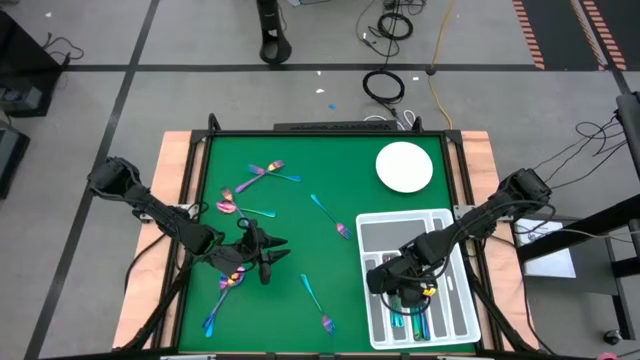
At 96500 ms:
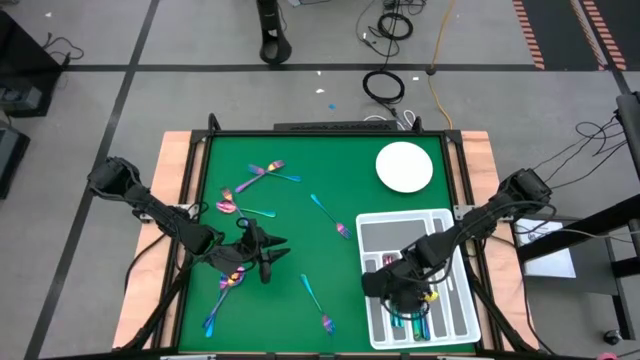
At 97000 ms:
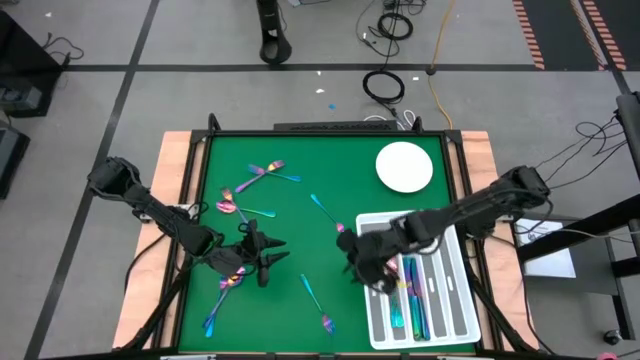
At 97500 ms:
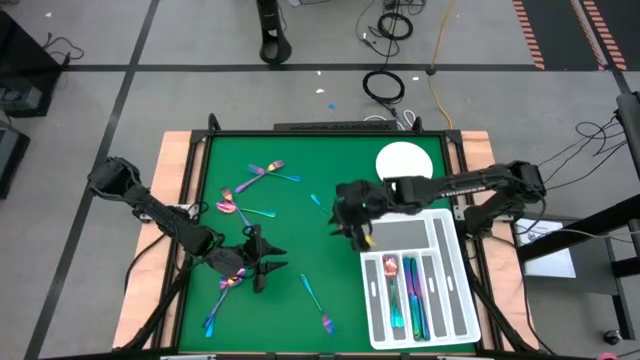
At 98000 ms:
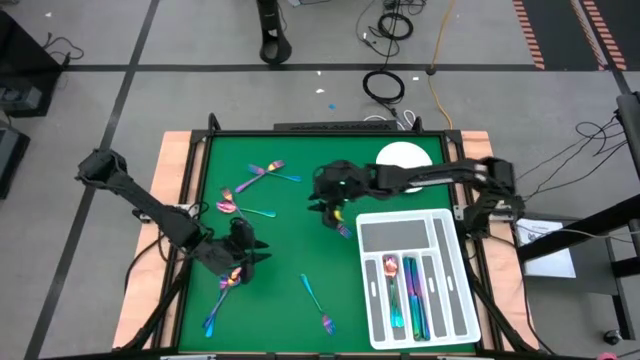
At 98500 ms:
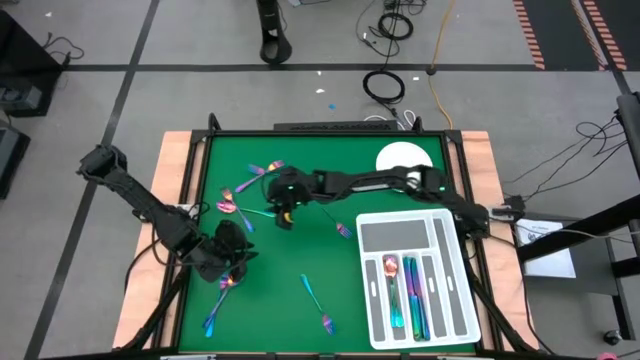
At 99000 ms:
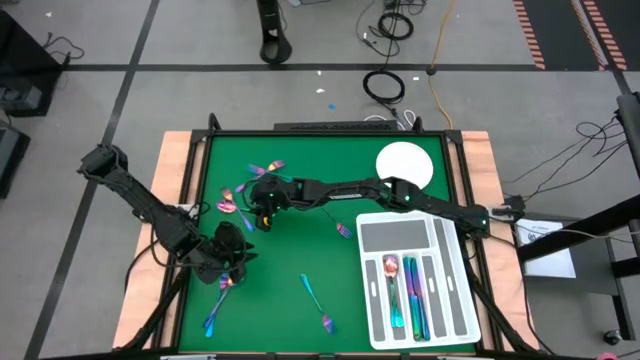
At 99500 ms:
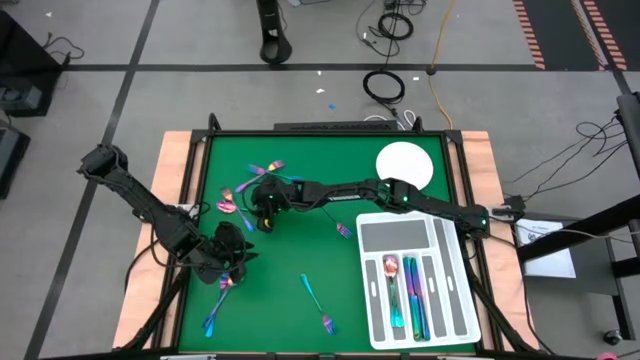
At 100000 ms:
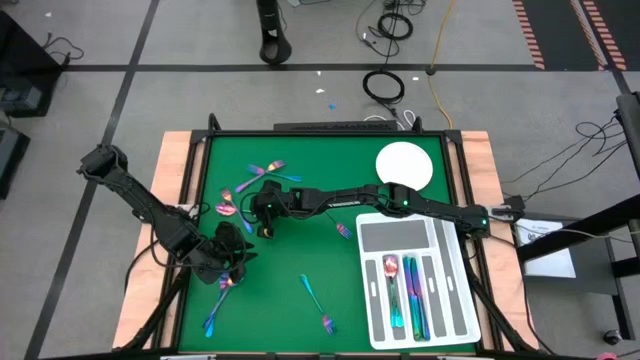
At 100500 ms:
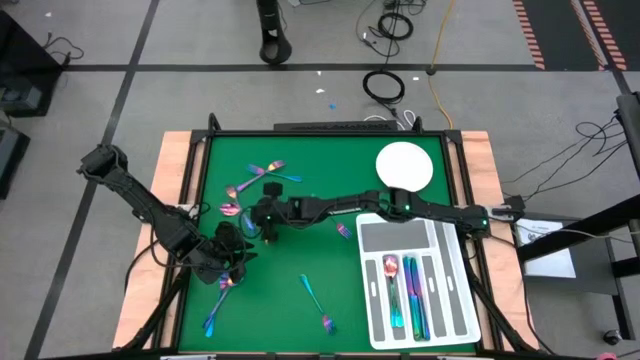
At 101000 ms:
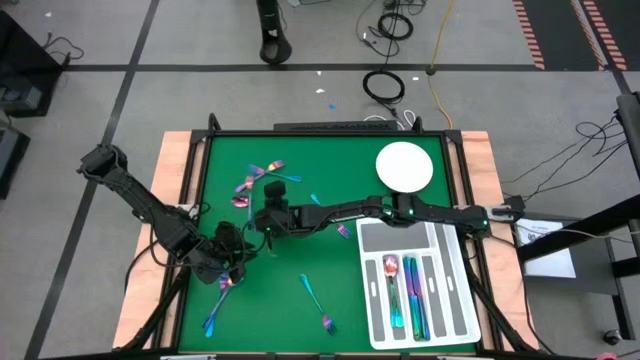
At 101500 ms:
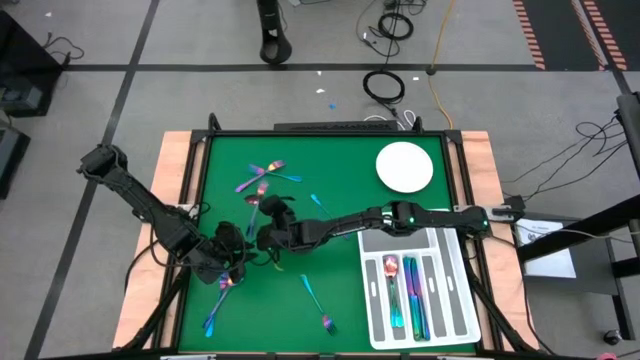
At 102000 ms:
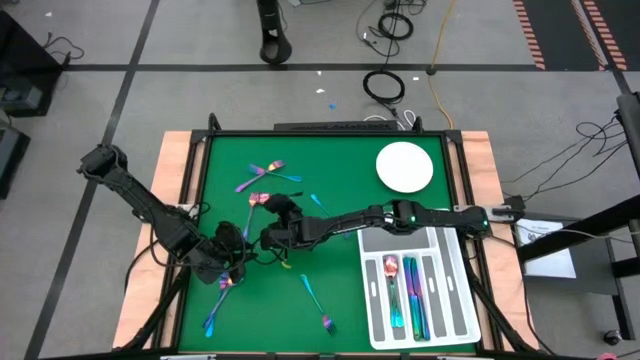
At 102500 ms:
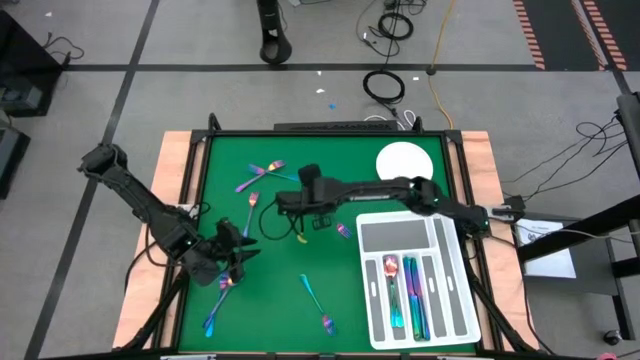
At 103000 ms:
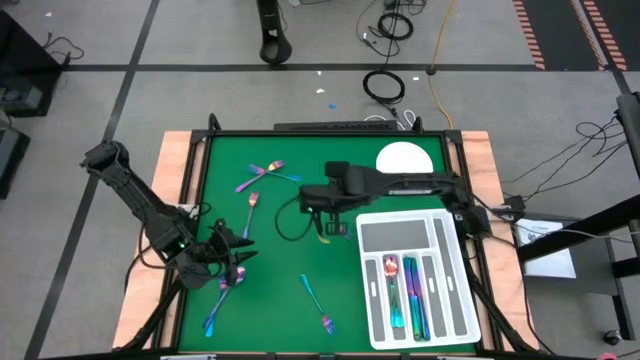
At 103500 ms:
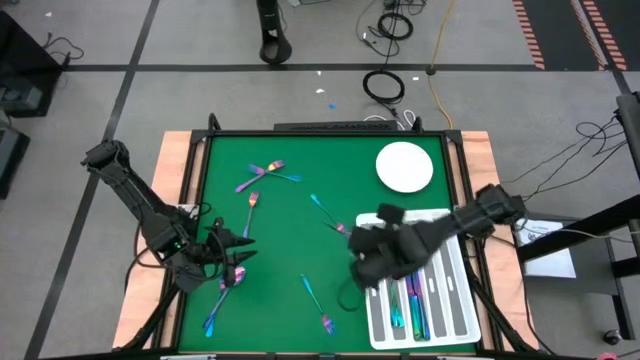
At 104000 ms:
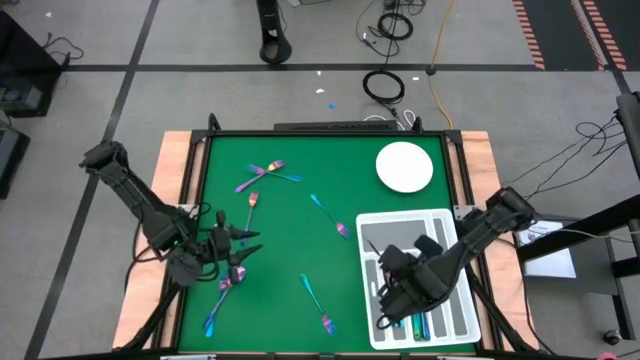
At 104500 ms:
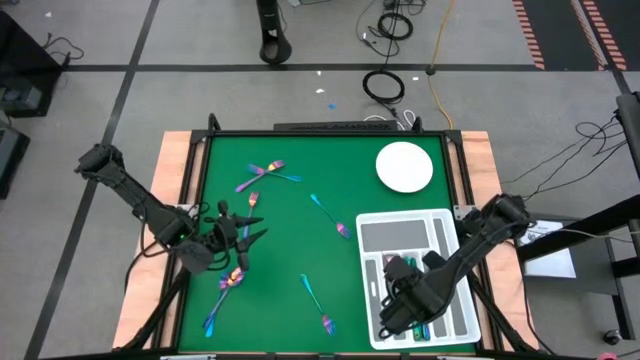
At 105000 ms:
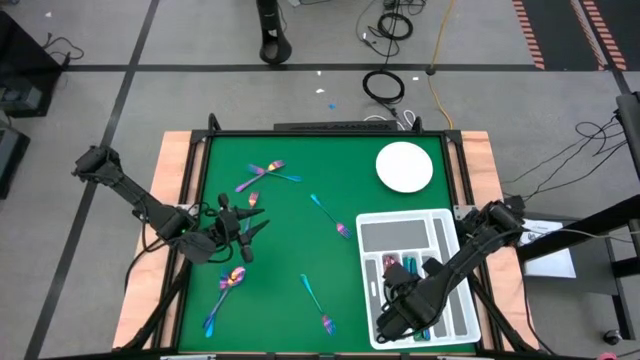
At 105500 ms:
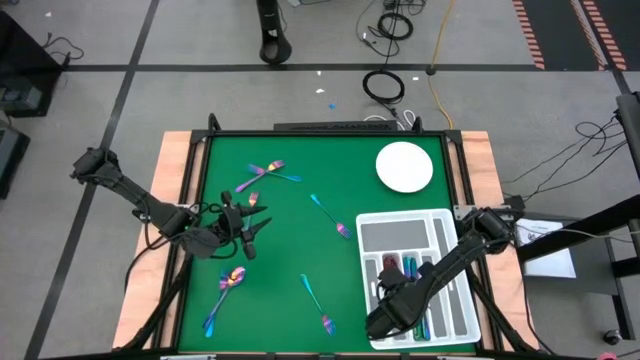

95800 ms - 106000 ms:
Task: Sort silverware
Put the top spoon into the utensil organizer

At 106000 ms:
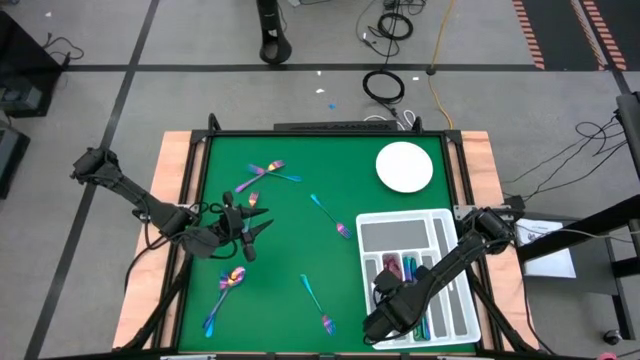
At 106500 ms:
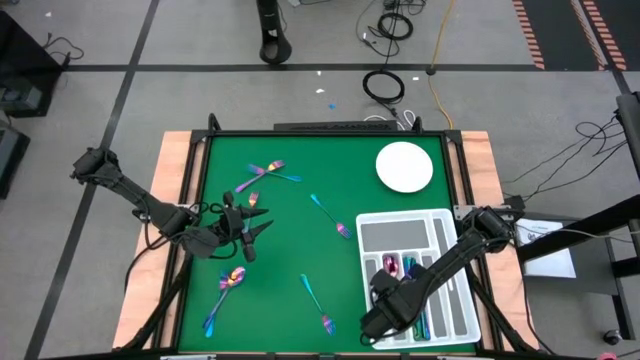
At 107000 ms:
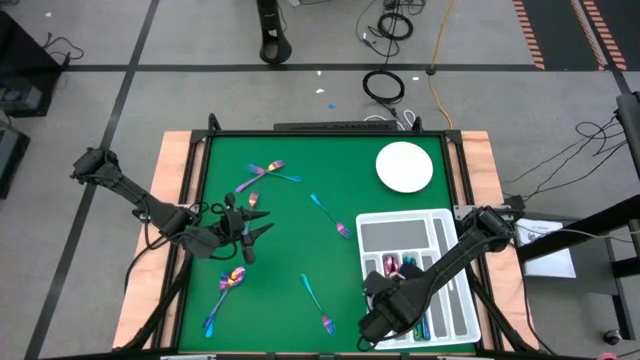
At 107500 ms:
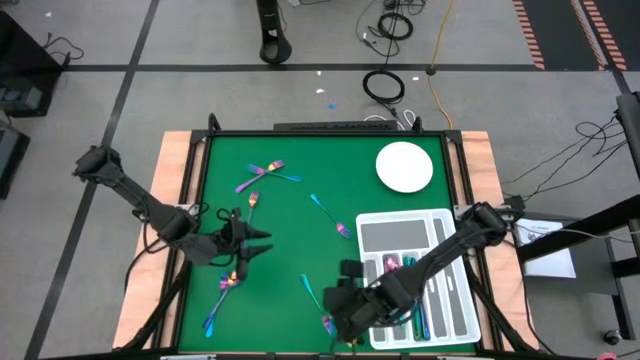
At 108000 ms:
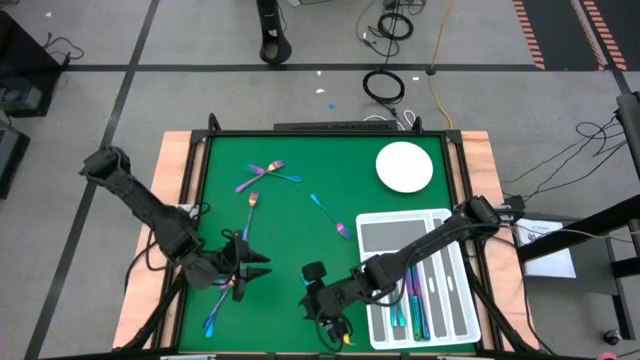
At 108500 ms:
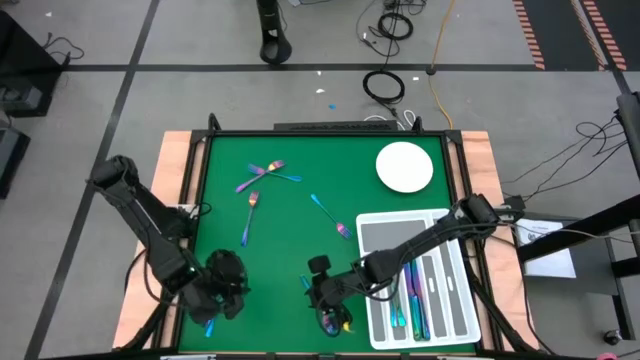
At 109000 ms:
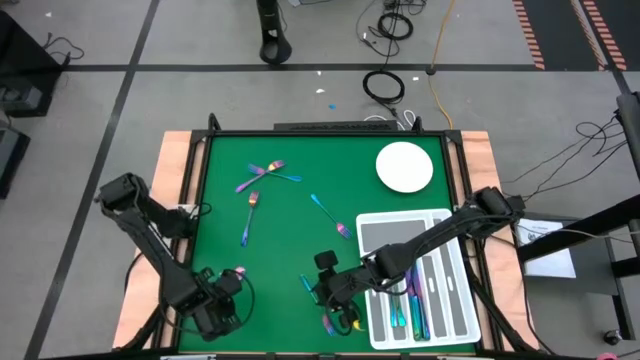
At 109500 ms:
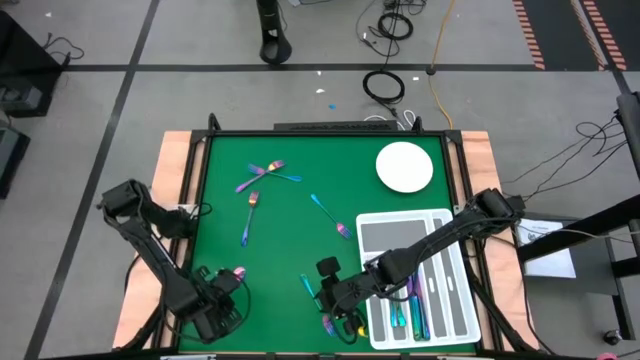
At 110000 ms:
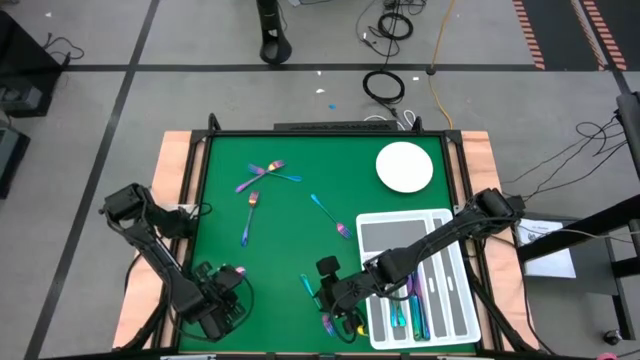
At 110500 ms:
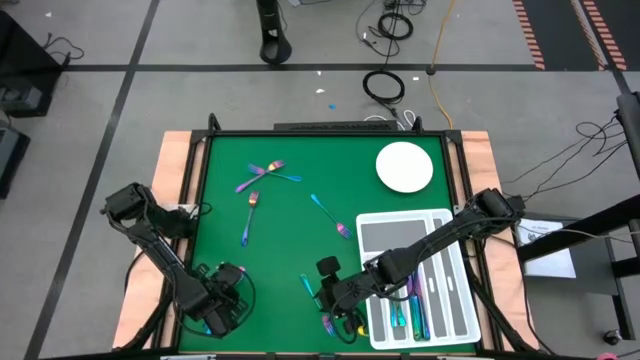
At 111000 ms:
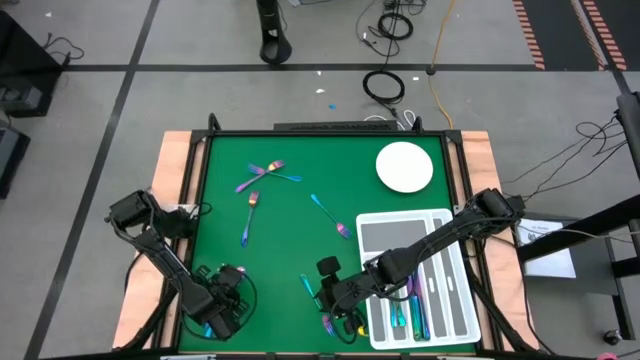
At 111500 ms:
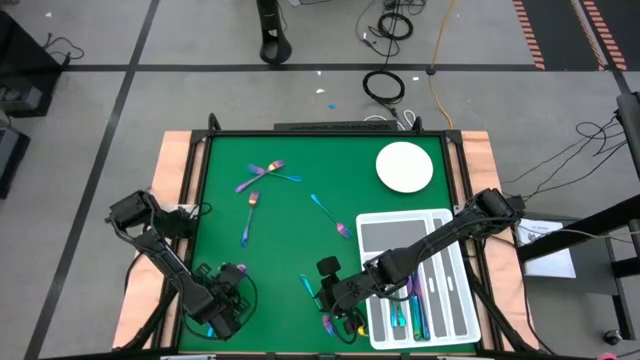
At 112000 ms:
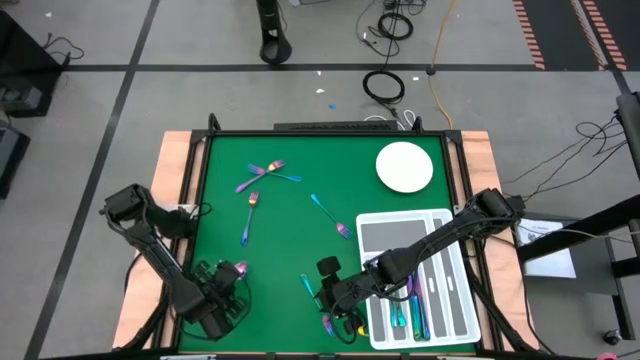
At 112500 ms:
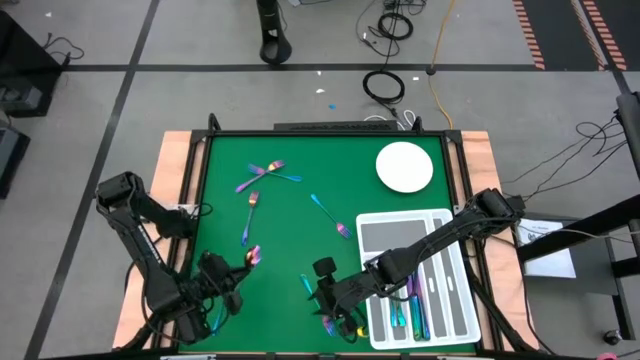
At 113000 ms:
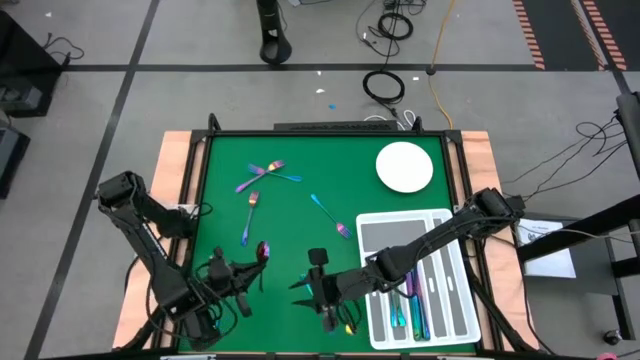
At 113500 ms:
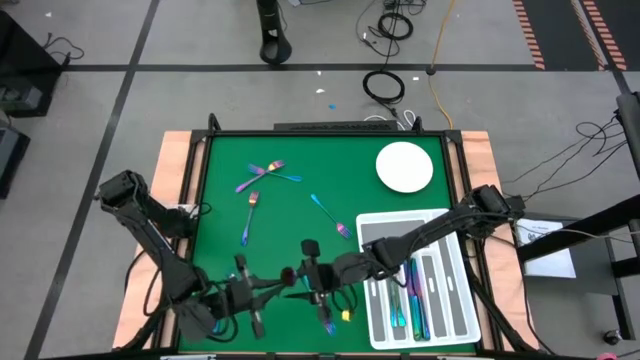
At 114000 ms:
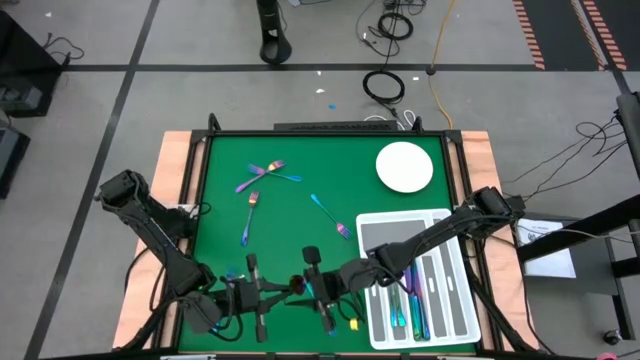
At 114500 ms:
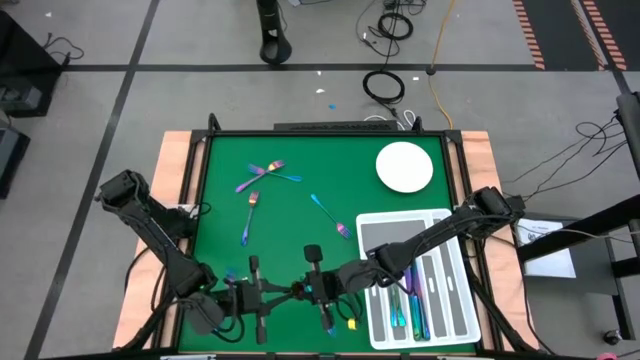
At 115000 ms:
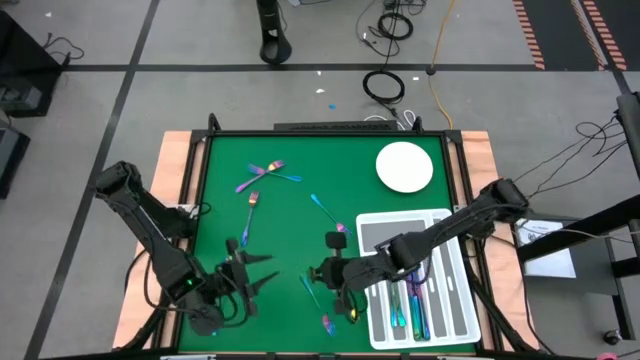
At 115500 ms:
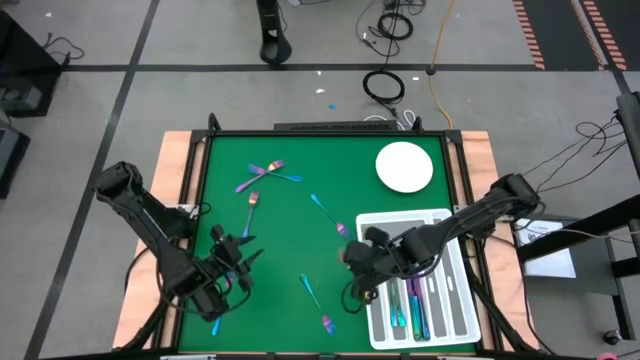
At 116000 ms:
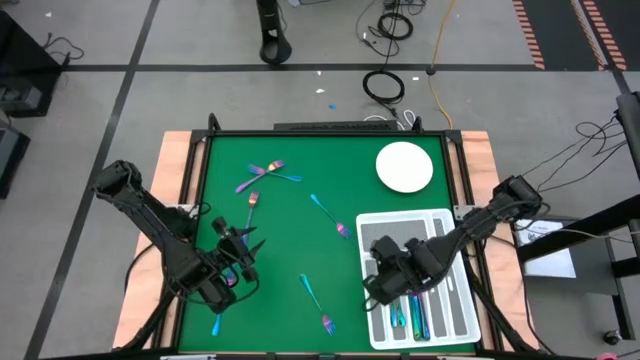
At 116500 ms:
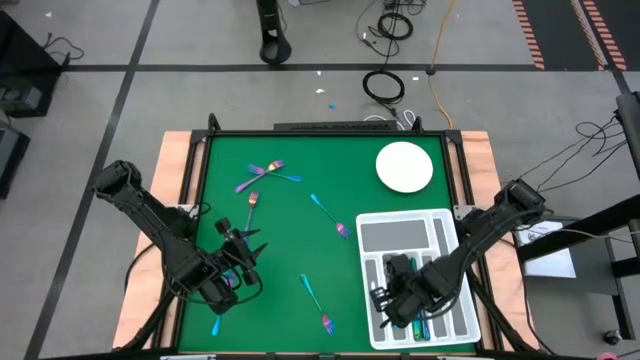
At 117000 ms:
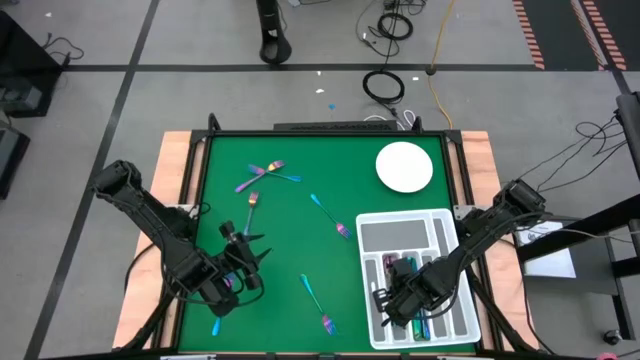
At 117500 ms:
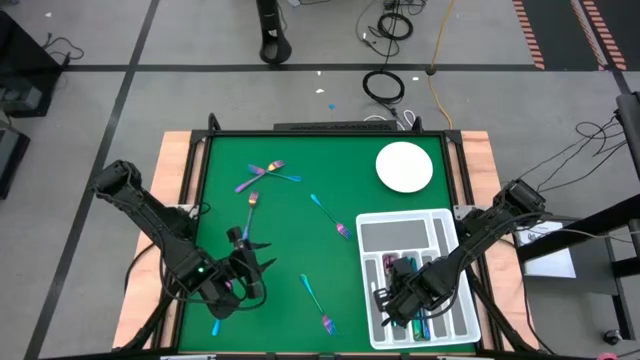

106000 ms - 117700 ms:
Put the spoon into the utensil organizer
